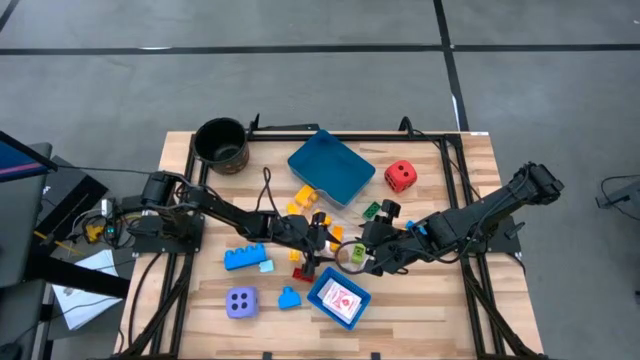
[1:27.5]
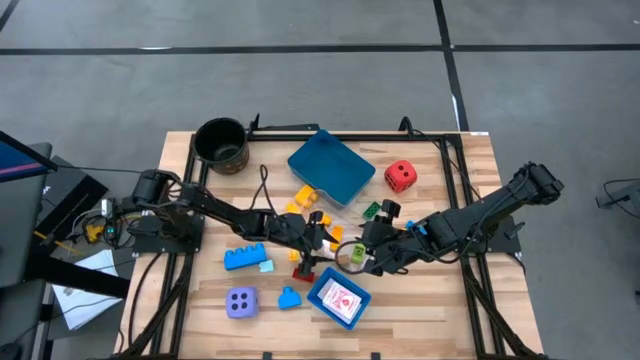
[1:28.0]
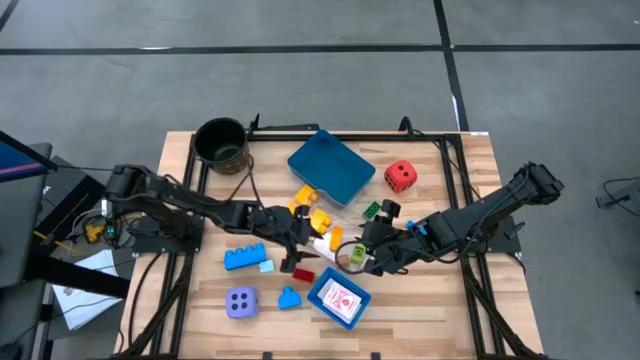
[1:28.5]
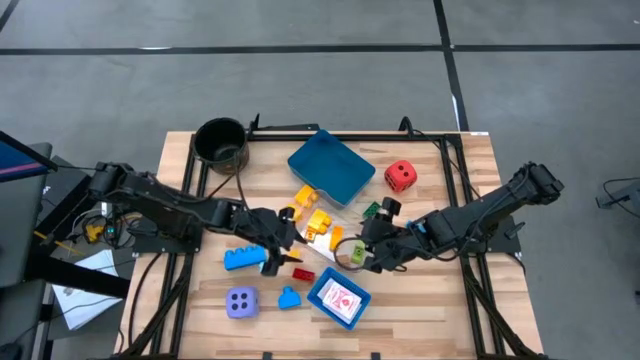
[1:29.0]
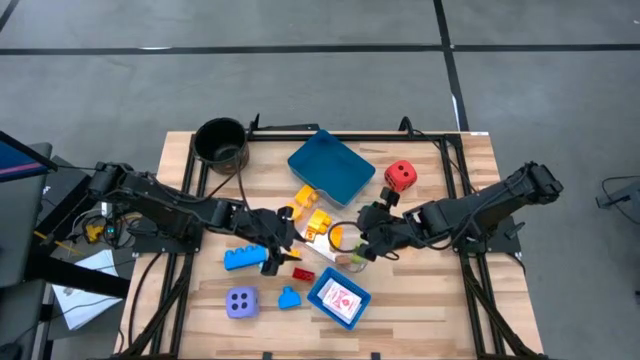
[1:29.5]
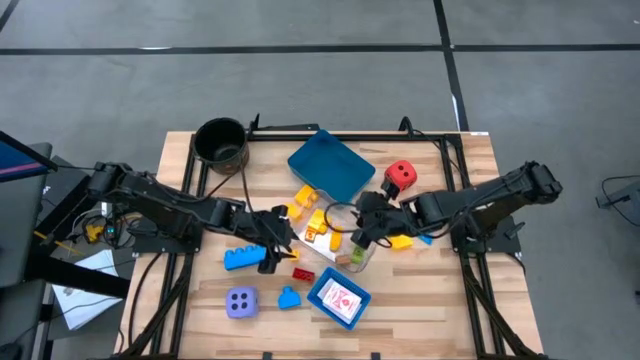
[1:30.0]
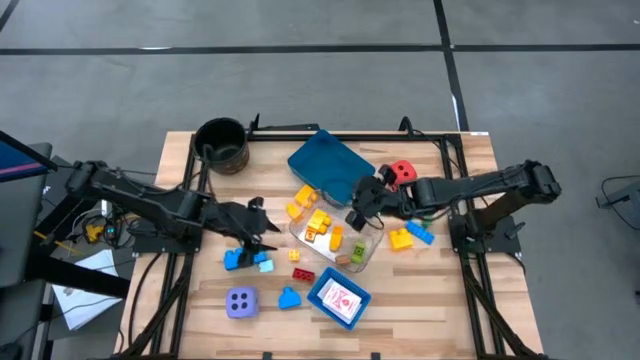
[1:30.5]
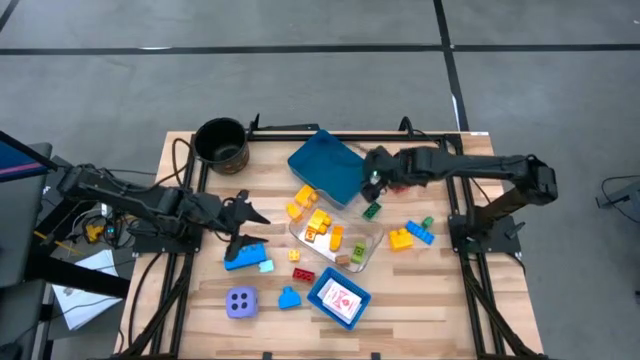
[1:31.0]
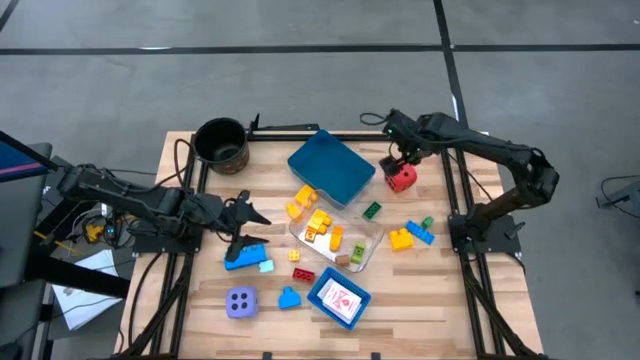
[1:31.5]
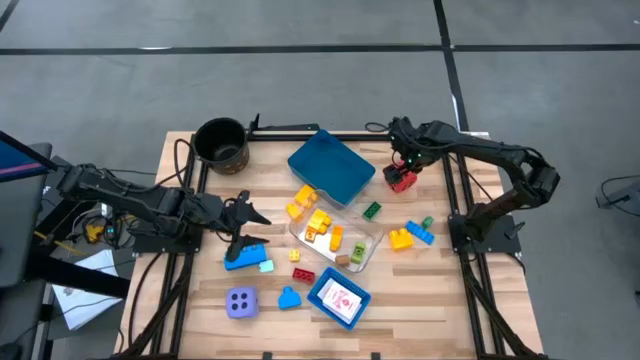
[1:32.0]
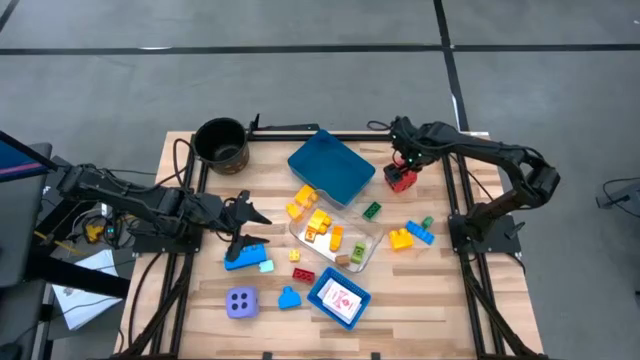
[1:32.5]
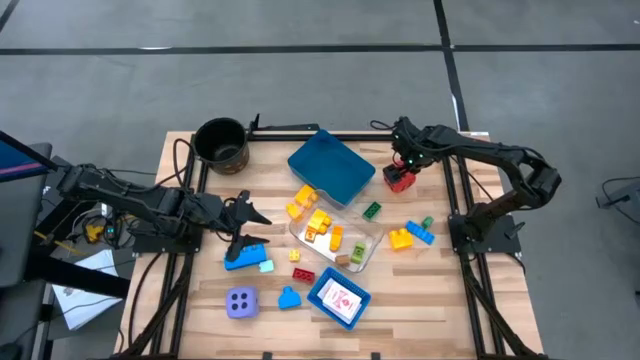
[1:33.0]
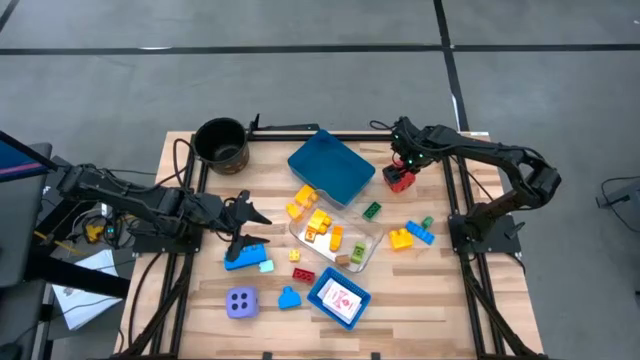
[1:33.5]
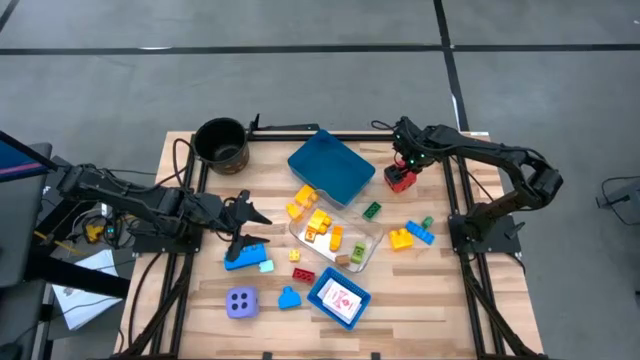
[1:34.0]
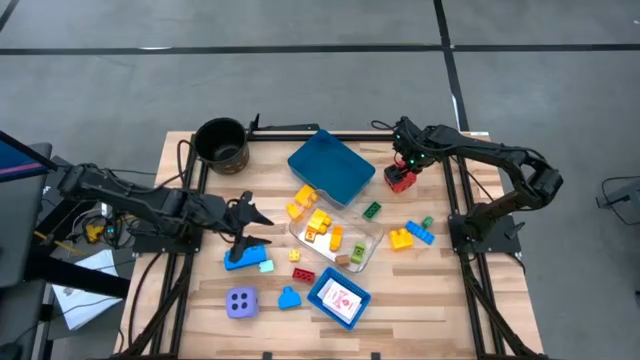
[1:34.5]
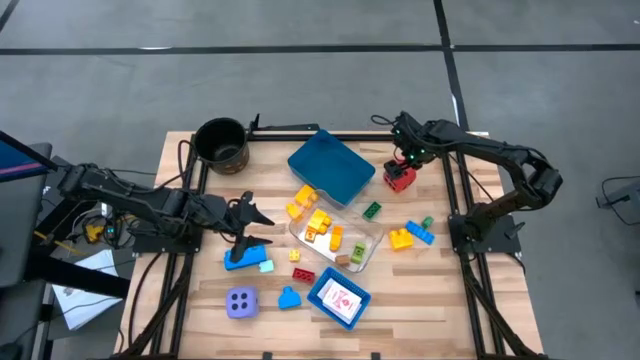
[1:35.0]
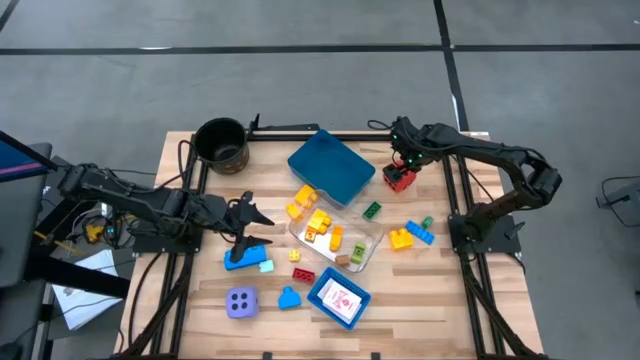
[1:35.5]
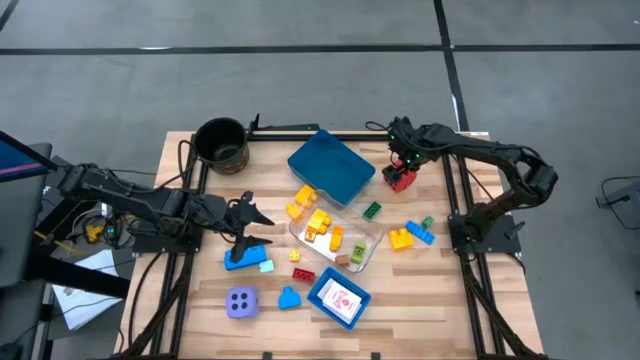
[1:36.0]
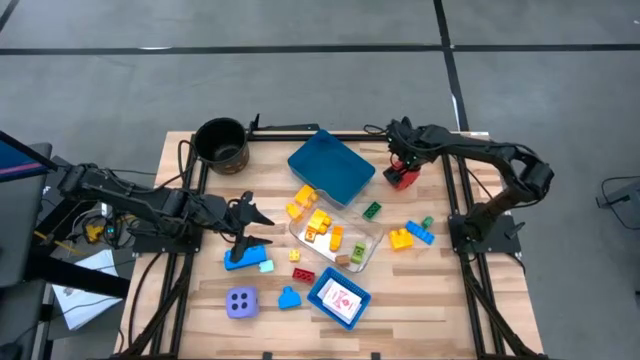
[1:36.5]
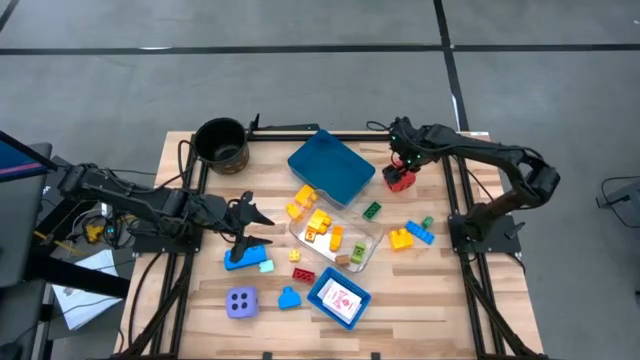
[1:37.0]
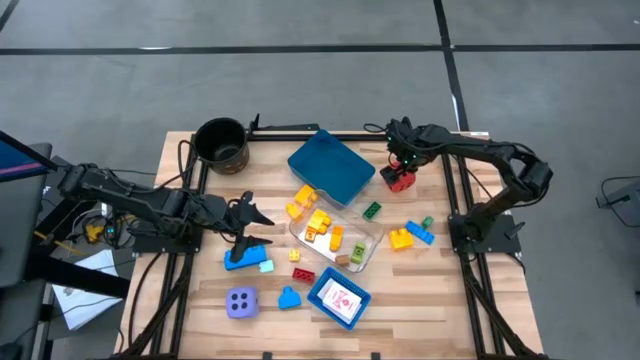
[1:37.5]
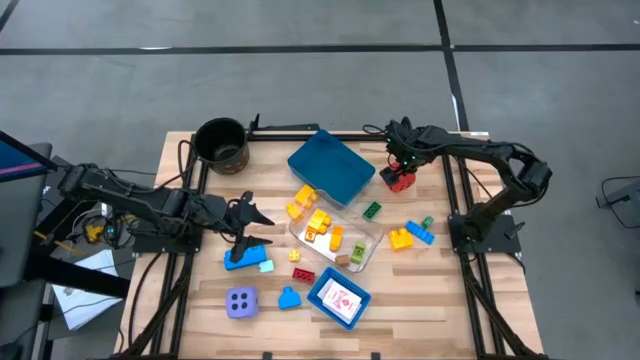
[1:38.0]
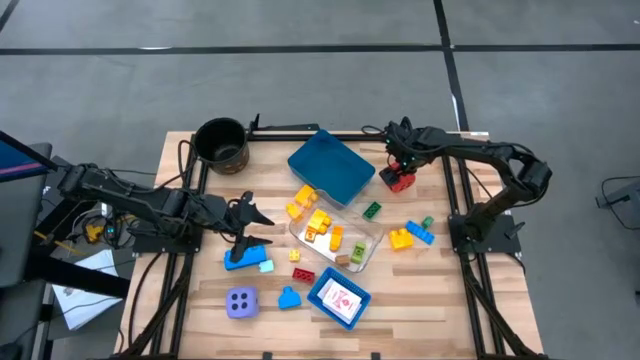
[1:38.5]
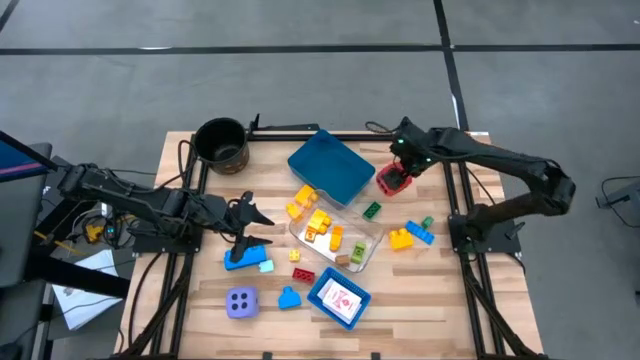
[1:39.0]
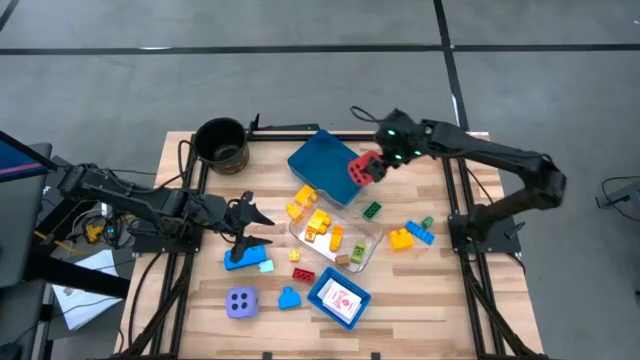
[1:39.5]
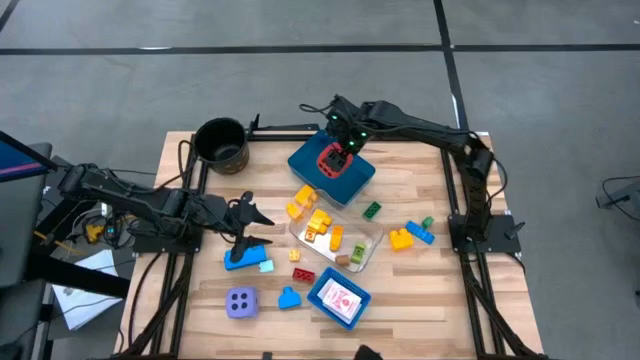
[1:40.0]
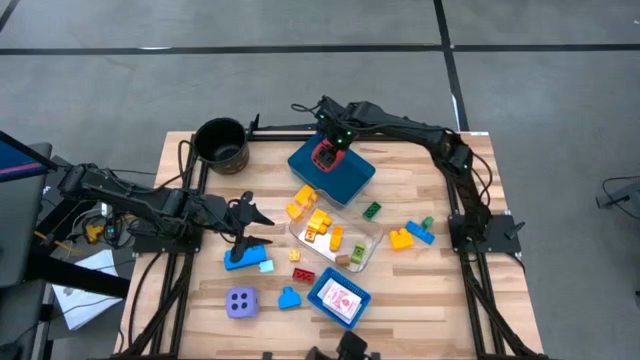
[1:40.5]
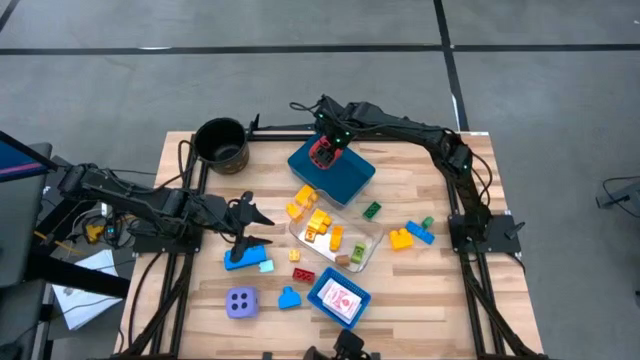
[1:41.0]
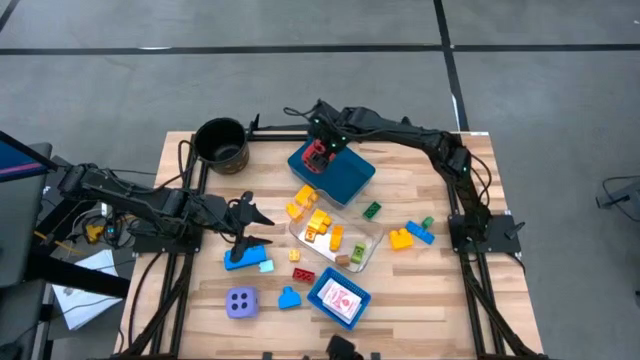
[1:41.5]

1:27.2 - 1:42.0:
Task: Pick & Place Toys
Put the red dice into the ocean blue bin

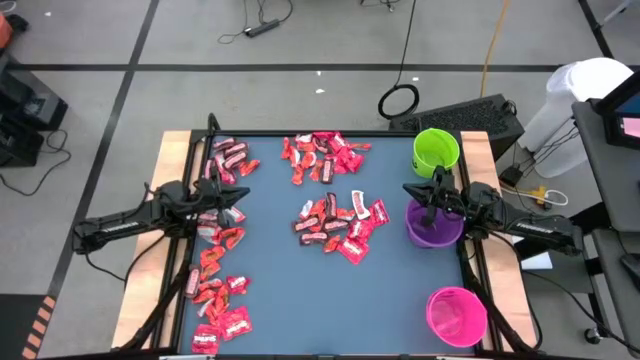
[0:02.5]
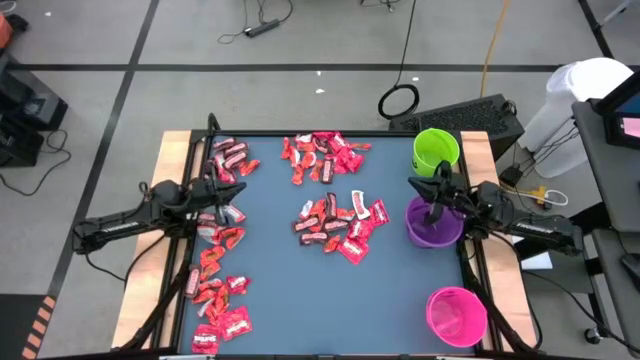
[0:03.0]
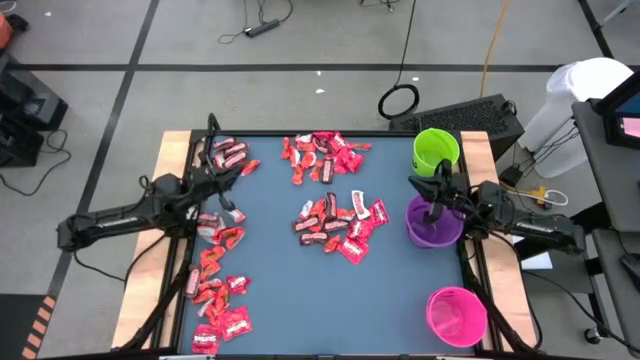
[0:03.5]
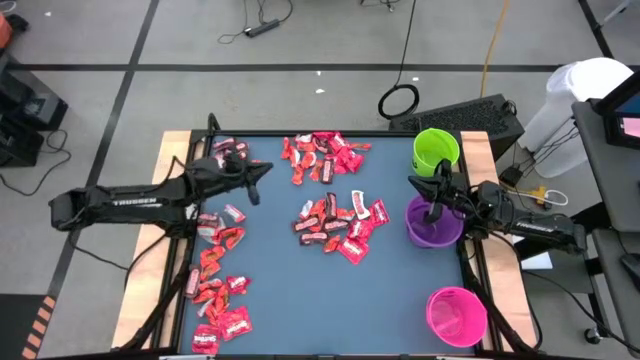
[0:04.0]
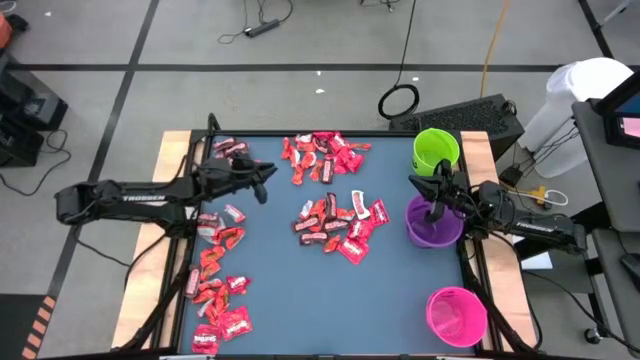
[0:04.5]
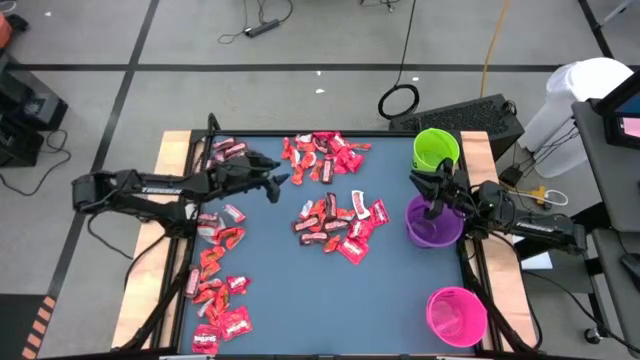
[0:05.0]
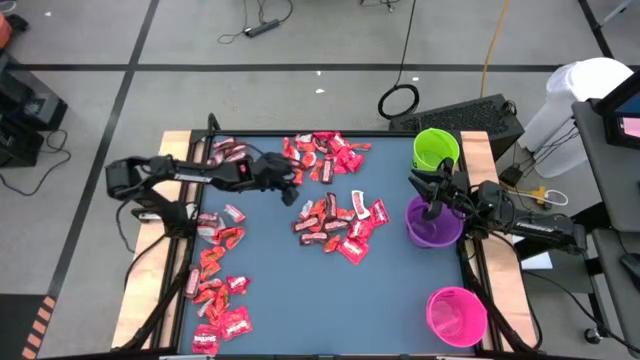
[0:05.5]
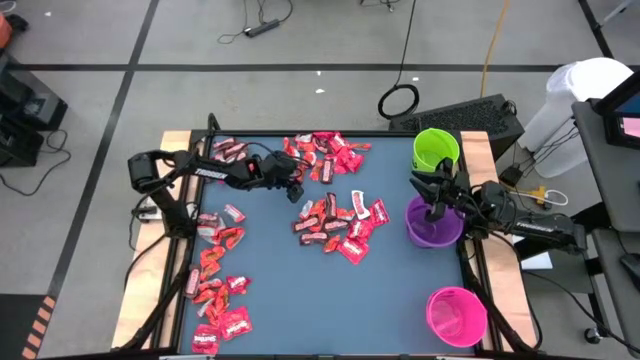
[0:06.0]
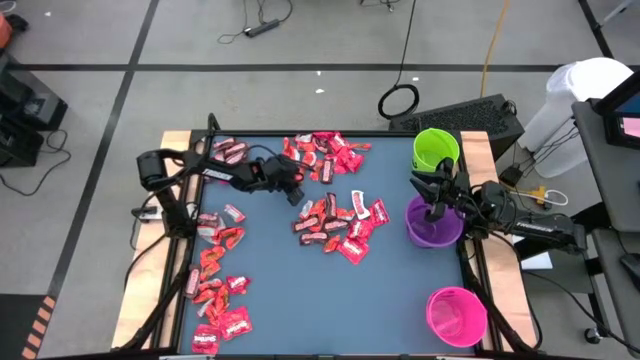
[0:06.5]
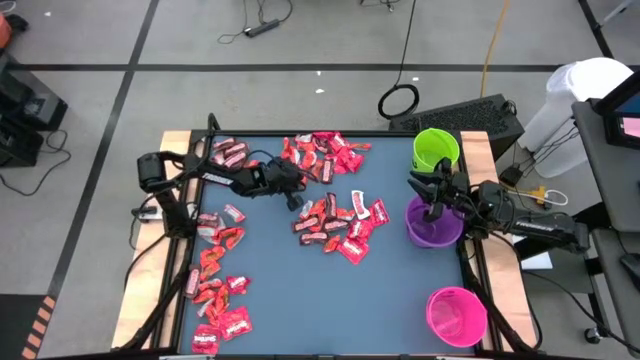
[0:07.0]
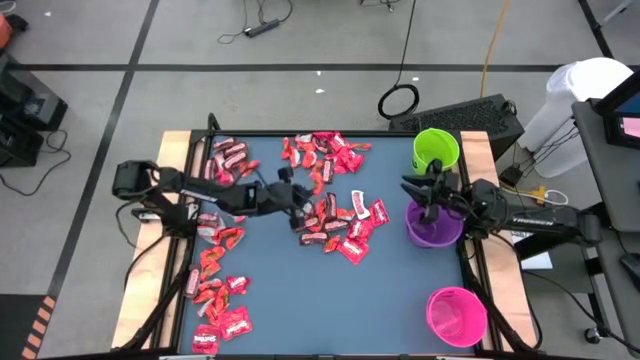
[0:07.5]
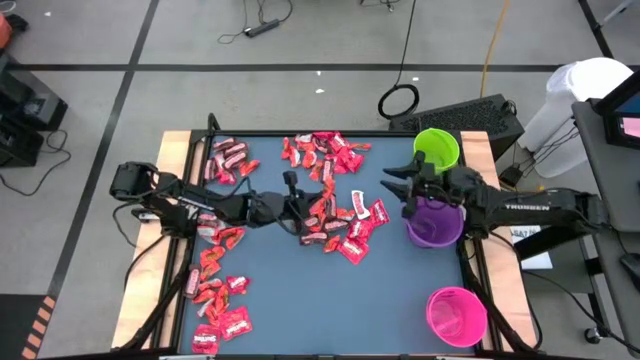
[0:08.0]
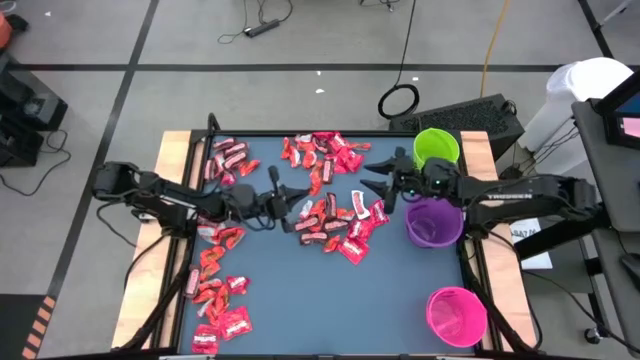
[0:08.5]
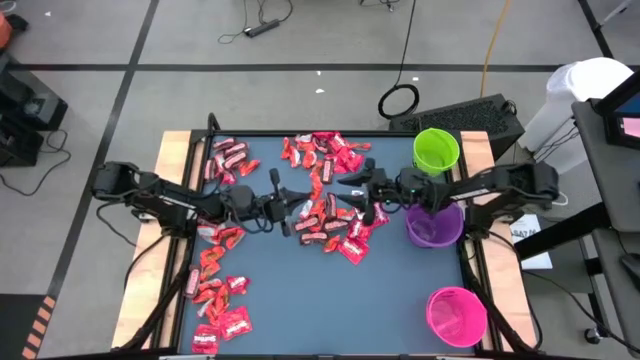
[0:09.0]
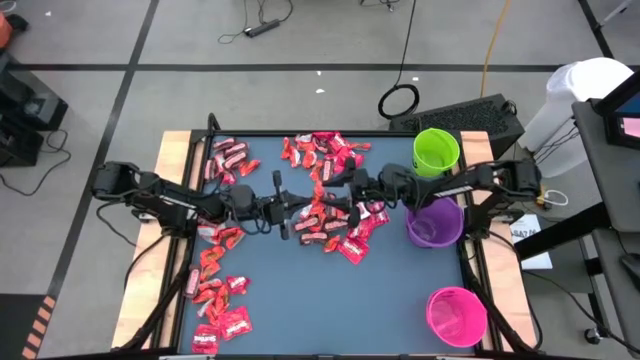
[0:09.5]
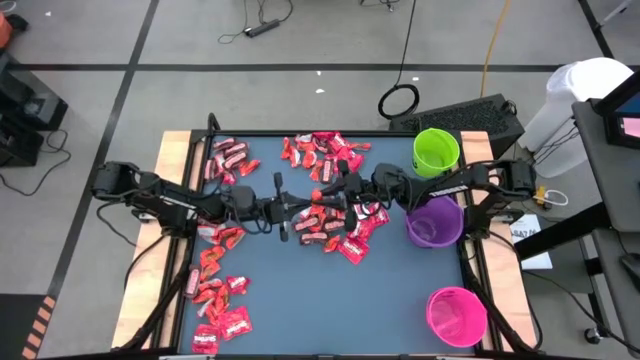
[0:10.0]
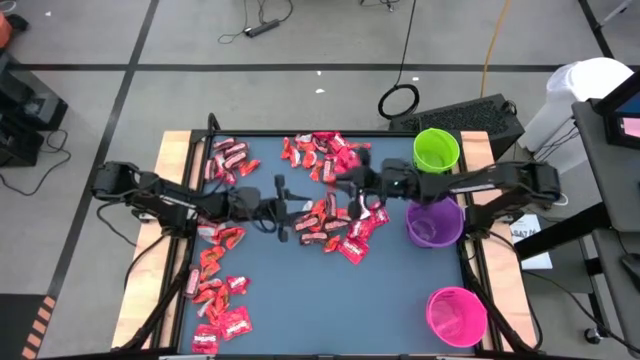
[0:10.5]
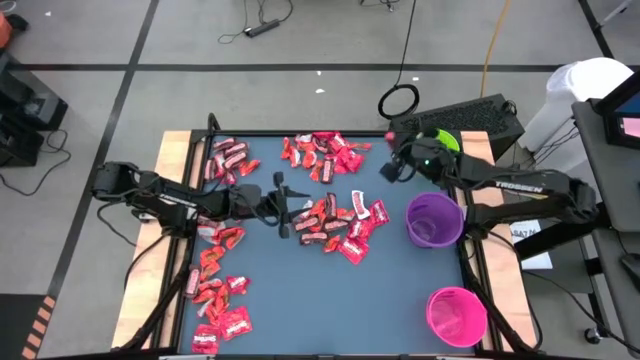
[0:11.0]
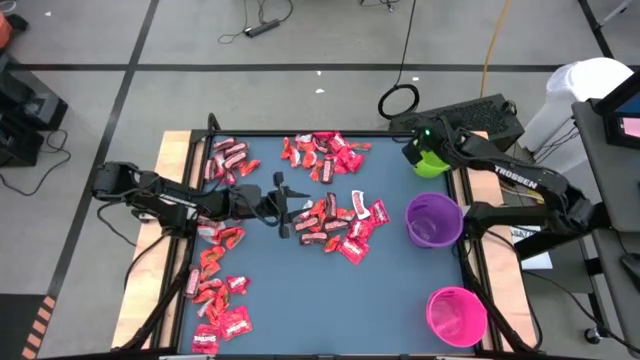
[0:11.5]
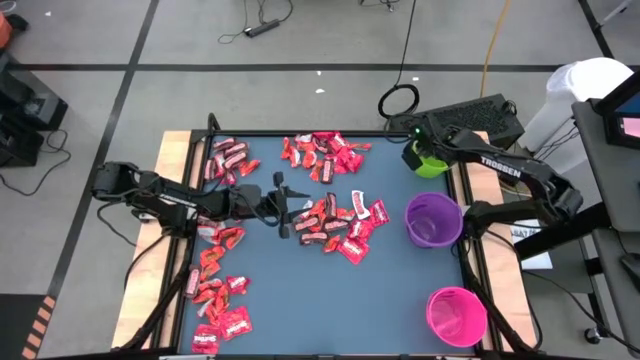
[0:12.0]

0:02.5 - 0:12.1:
Task: Organize candy in baskets
Put the orange chocolate bar into the green bucket
